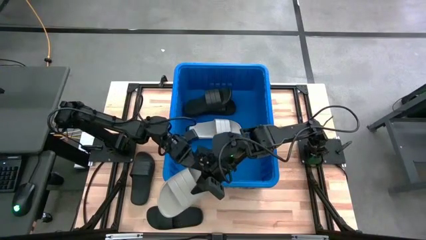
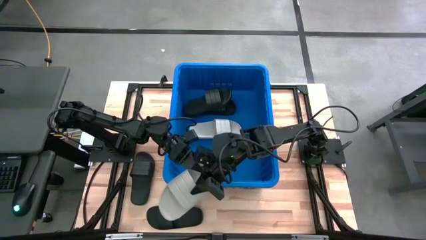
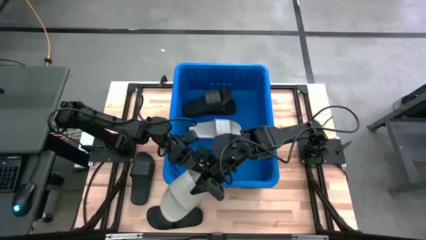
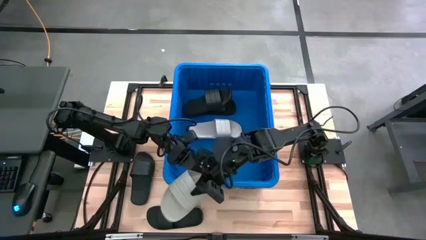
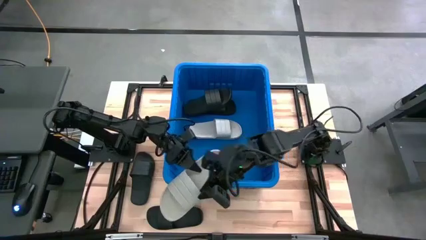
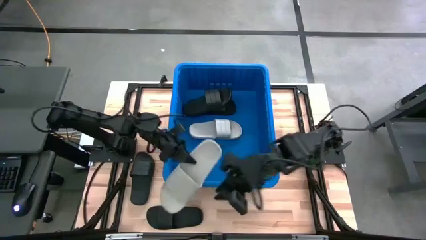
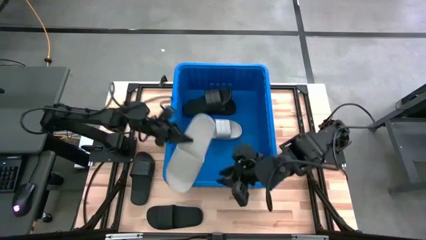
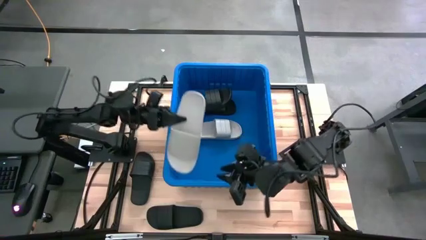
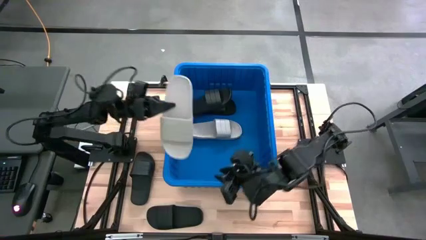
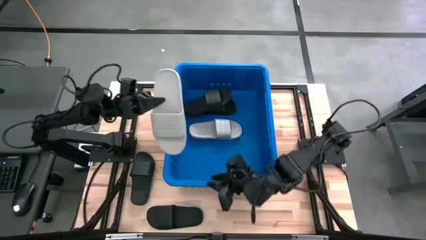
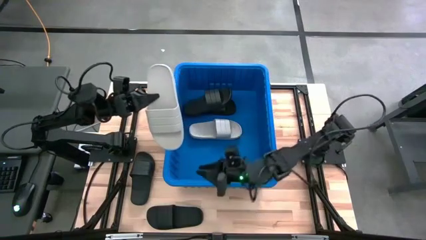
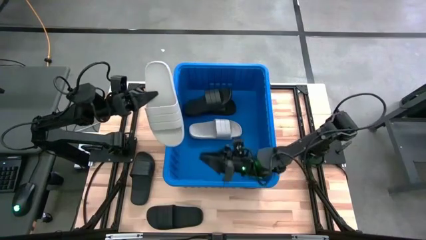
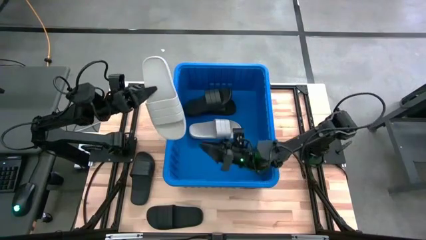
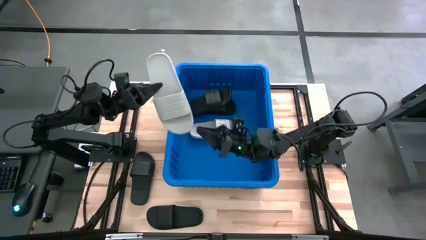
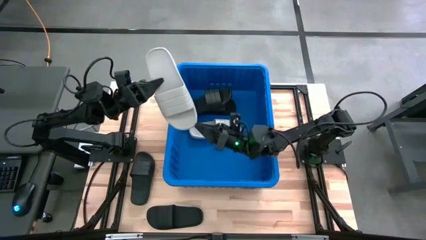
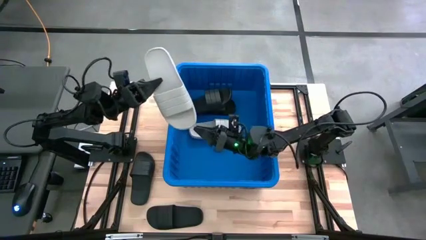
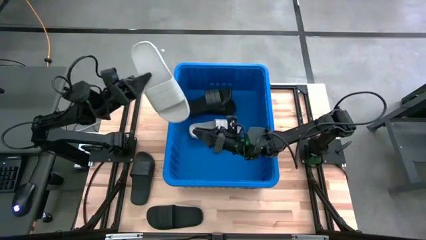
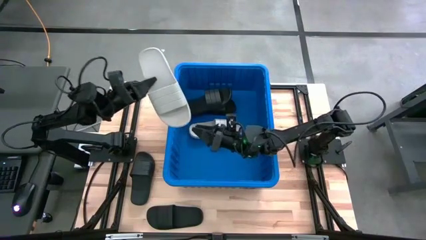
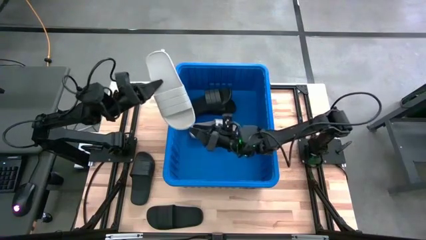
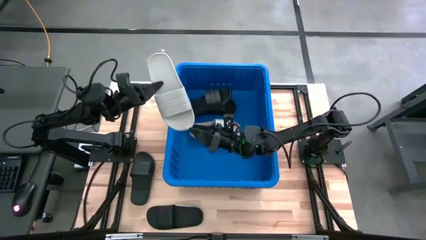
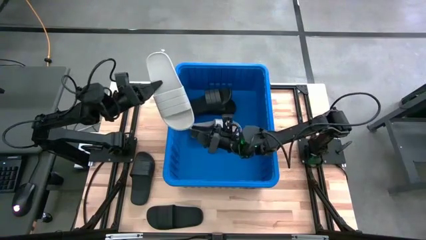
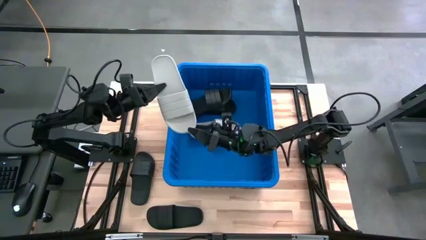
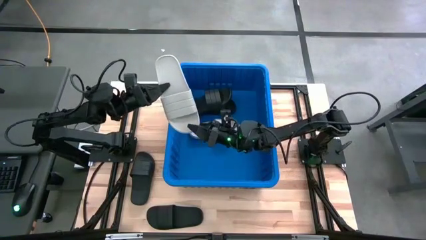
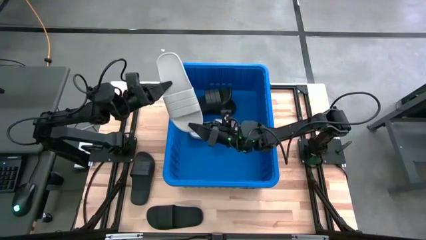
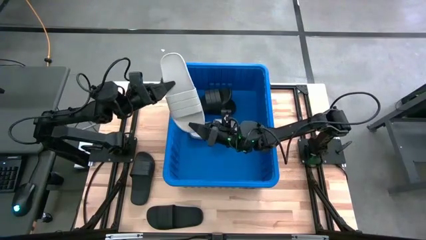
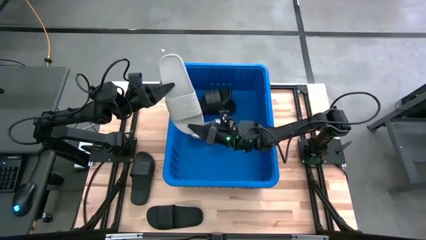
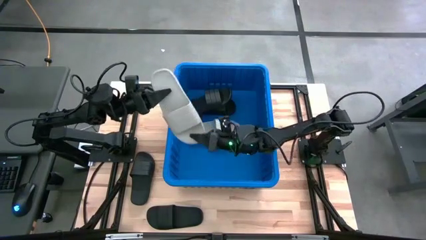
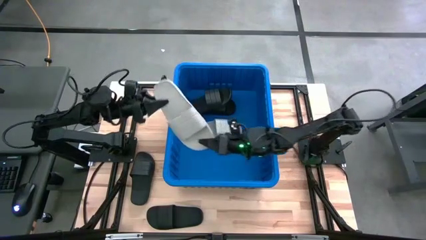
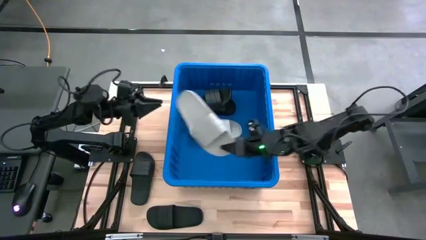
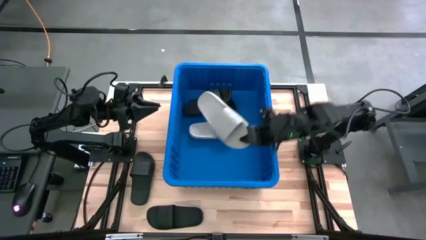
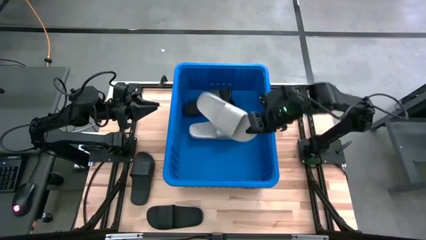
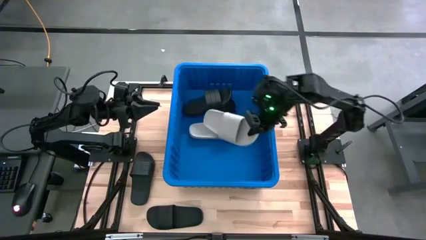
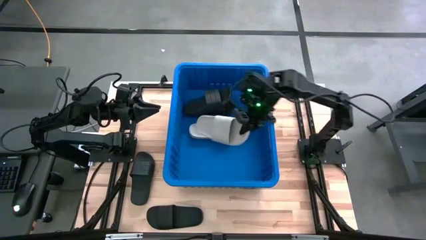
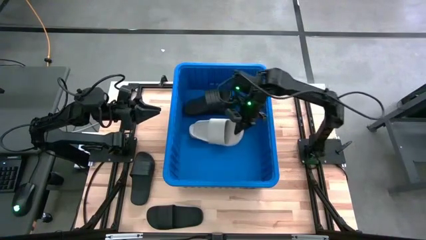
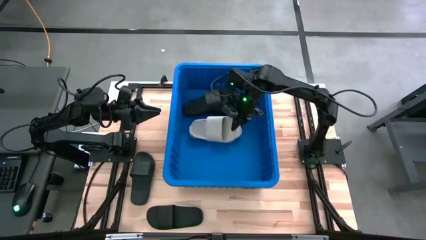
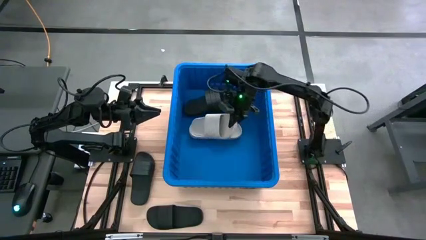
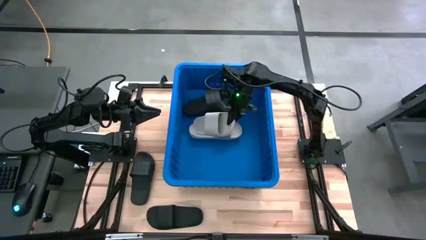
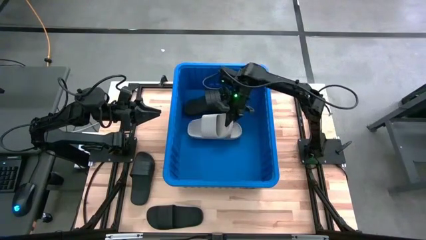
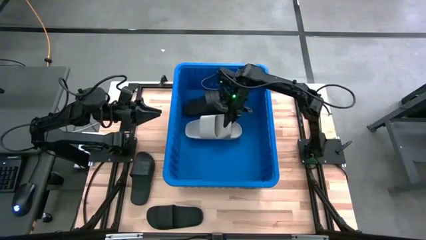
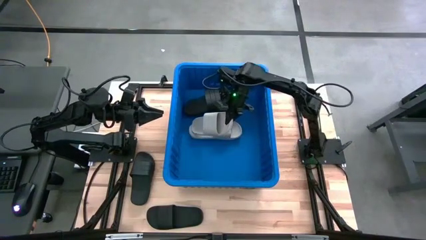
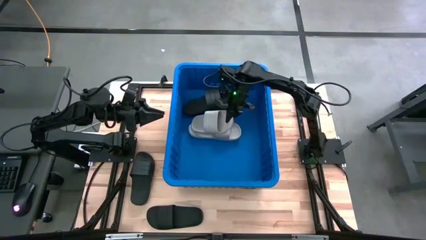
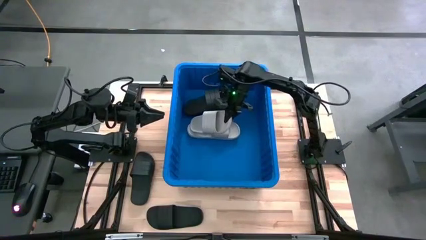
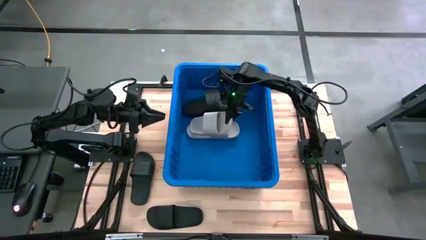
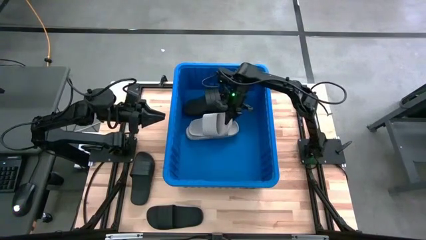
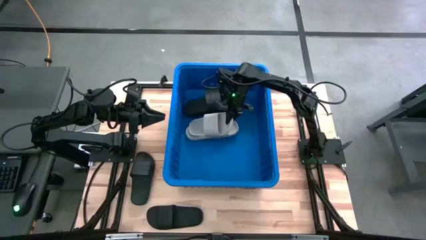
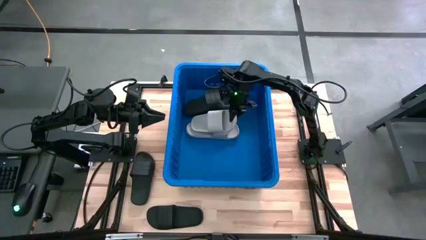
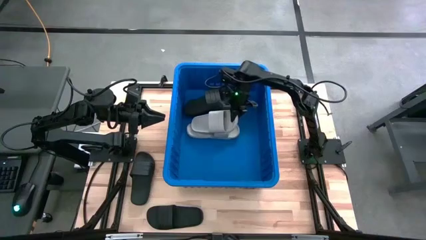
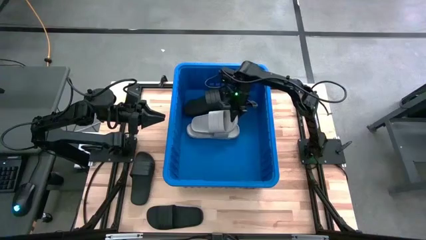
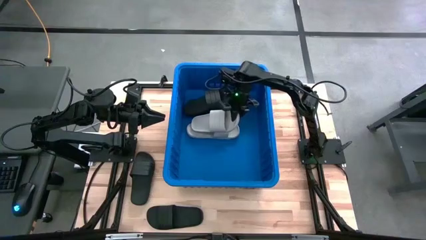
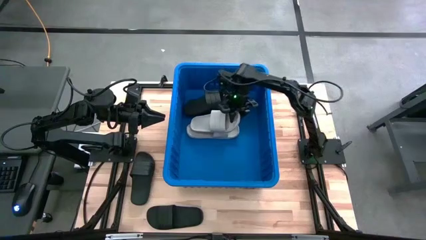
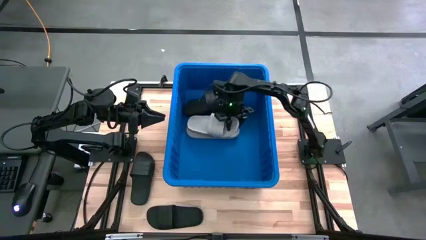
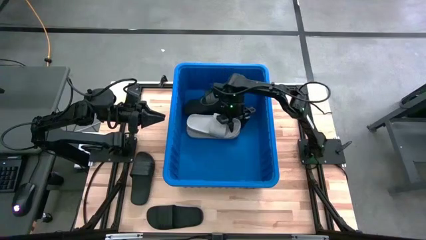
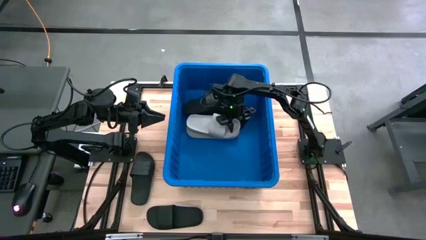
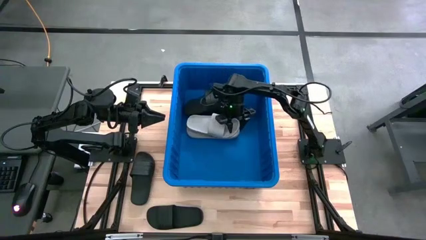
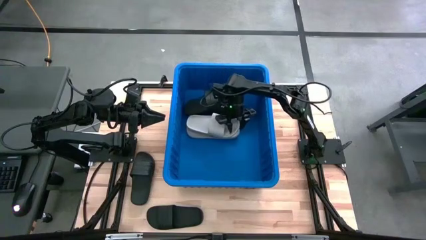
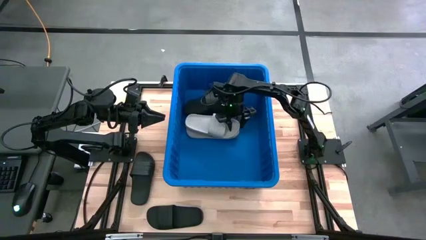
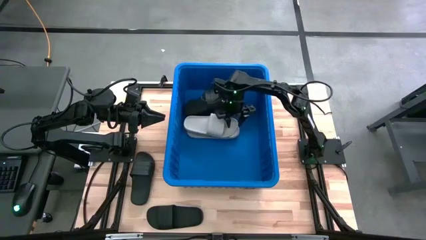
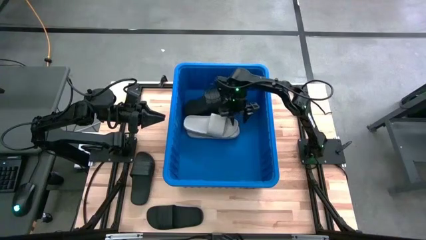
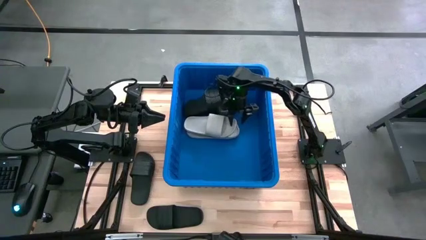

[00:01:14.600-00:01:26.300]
Task: Pick and place slides into bin
Put the white slipper into the bin
